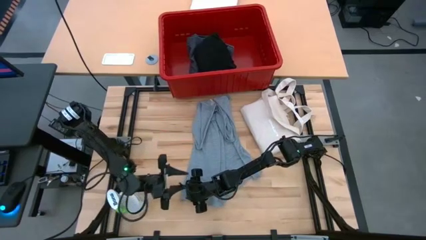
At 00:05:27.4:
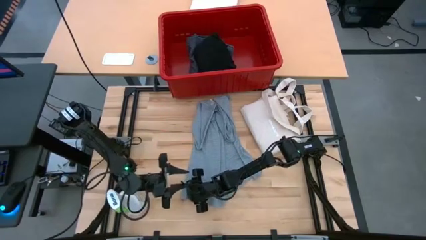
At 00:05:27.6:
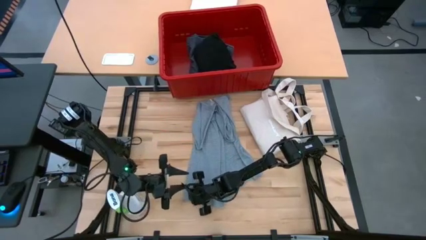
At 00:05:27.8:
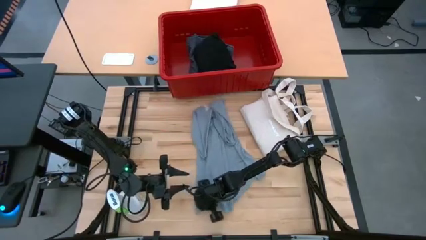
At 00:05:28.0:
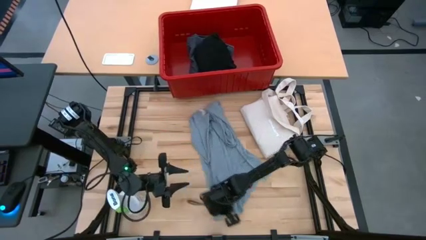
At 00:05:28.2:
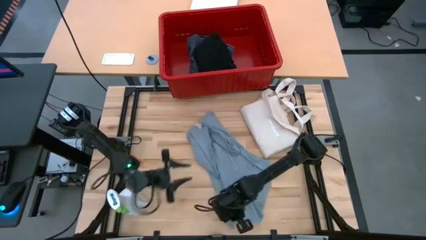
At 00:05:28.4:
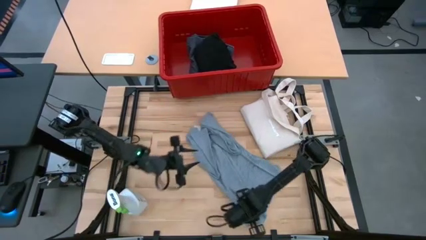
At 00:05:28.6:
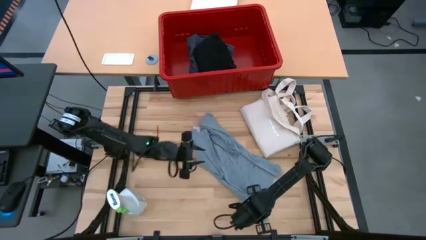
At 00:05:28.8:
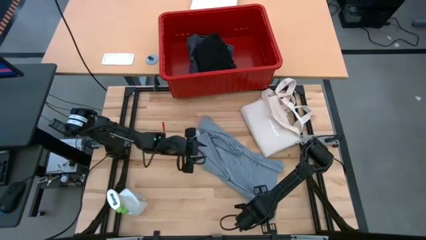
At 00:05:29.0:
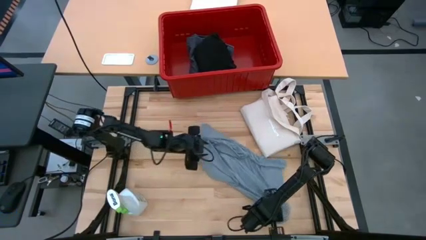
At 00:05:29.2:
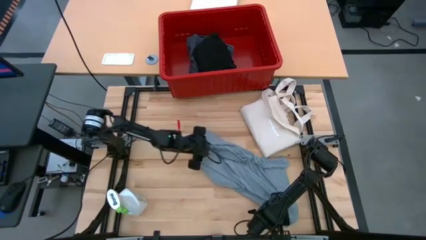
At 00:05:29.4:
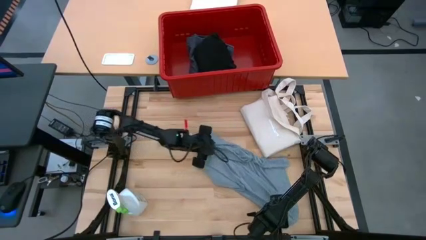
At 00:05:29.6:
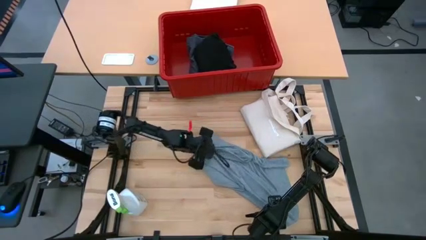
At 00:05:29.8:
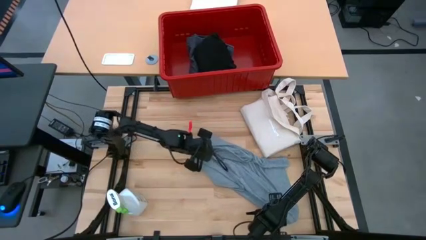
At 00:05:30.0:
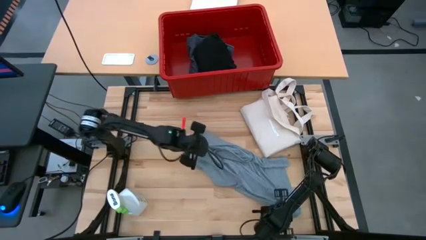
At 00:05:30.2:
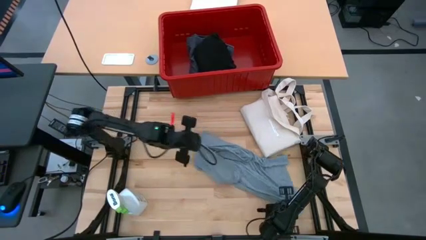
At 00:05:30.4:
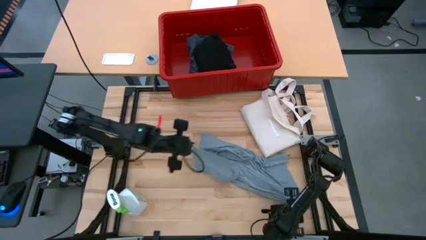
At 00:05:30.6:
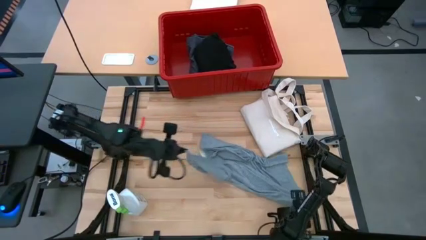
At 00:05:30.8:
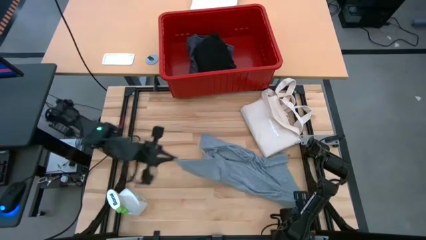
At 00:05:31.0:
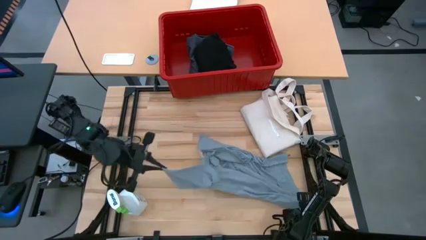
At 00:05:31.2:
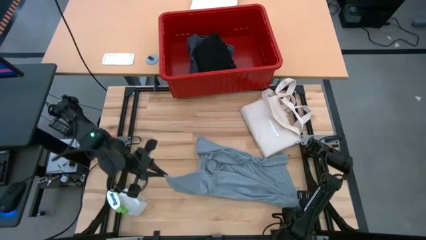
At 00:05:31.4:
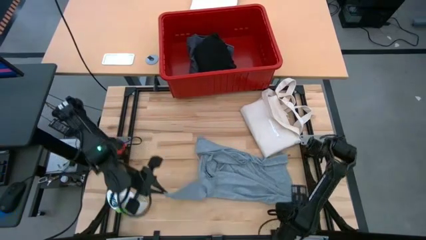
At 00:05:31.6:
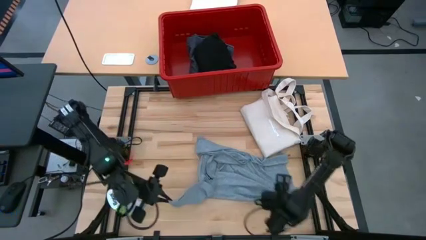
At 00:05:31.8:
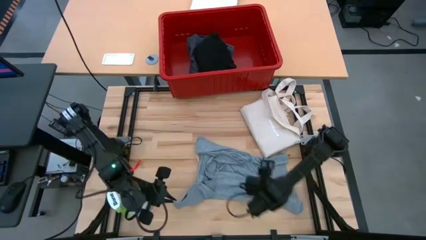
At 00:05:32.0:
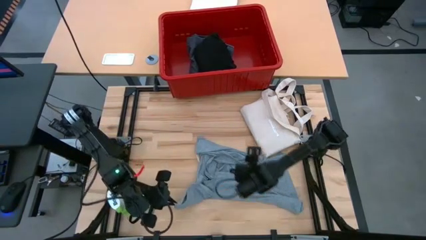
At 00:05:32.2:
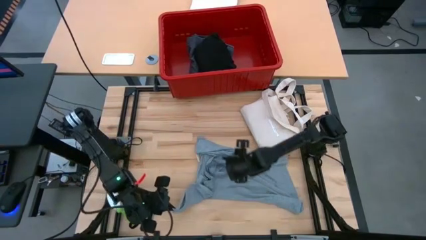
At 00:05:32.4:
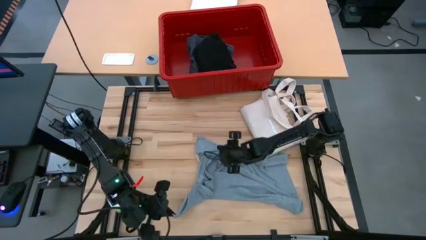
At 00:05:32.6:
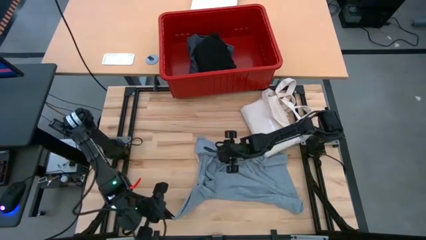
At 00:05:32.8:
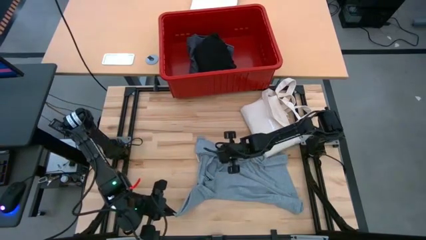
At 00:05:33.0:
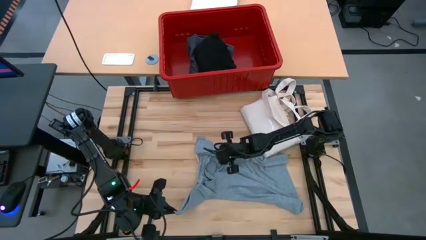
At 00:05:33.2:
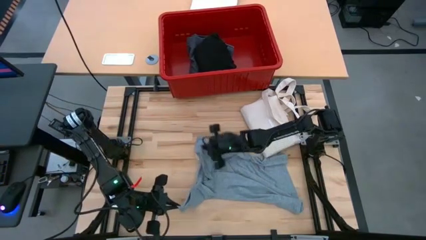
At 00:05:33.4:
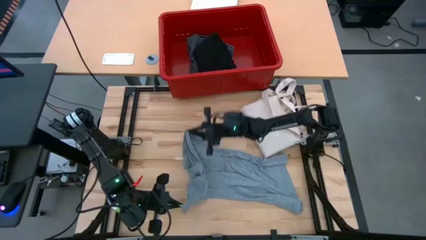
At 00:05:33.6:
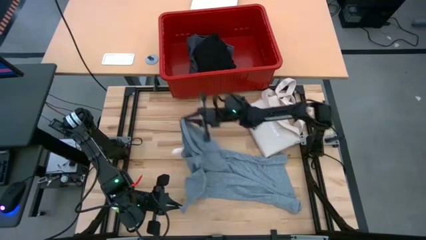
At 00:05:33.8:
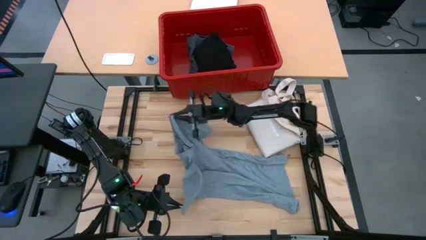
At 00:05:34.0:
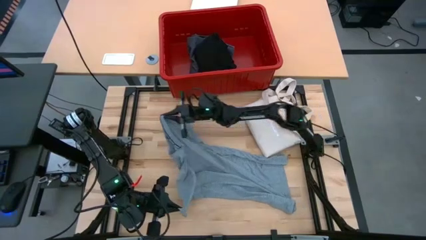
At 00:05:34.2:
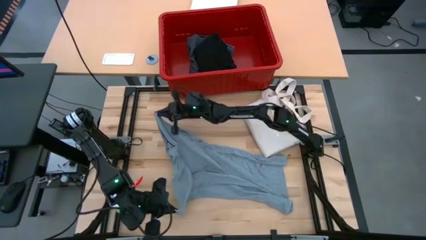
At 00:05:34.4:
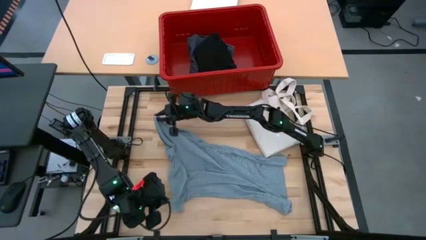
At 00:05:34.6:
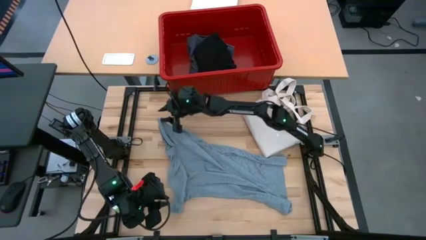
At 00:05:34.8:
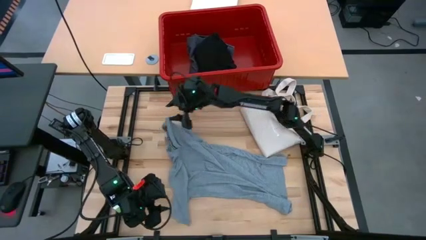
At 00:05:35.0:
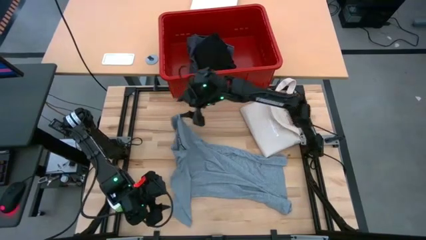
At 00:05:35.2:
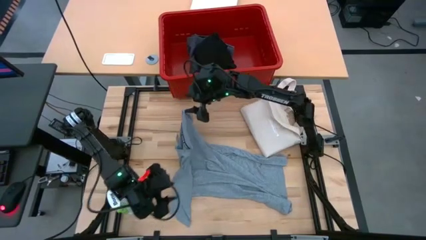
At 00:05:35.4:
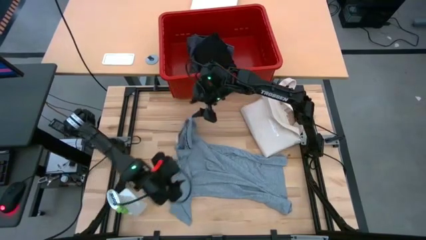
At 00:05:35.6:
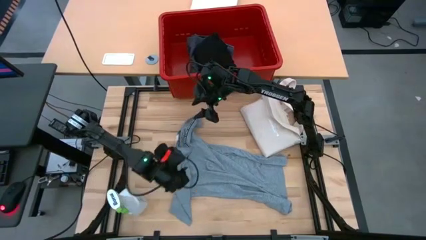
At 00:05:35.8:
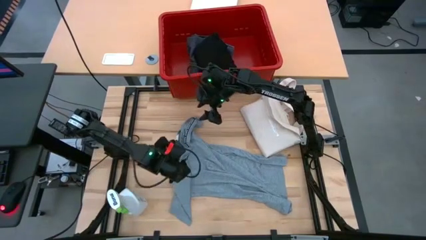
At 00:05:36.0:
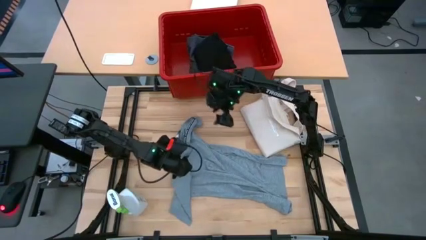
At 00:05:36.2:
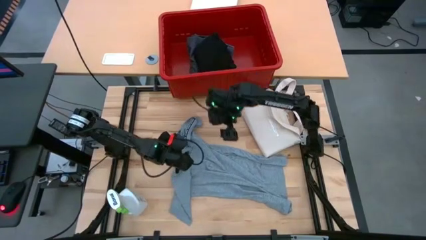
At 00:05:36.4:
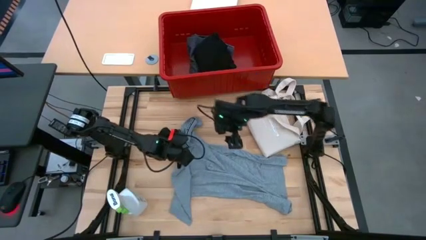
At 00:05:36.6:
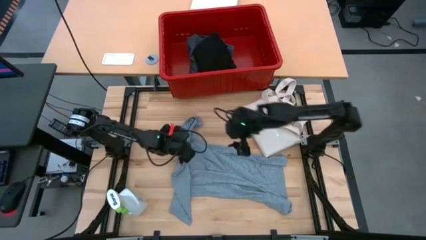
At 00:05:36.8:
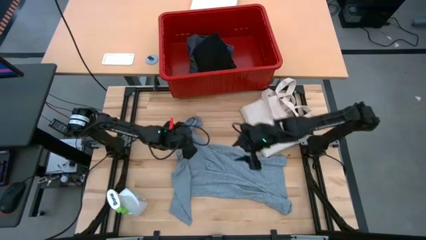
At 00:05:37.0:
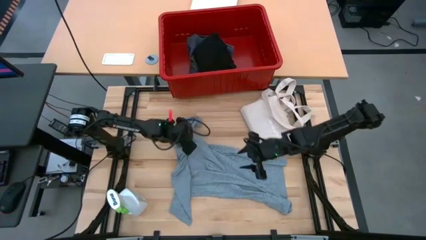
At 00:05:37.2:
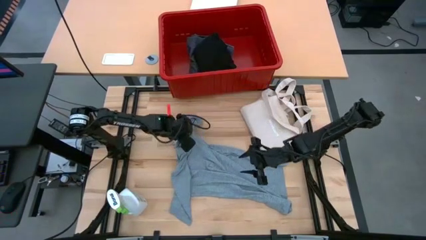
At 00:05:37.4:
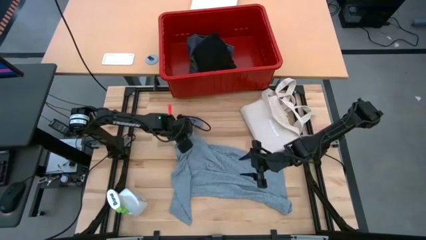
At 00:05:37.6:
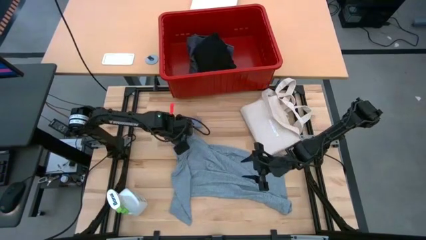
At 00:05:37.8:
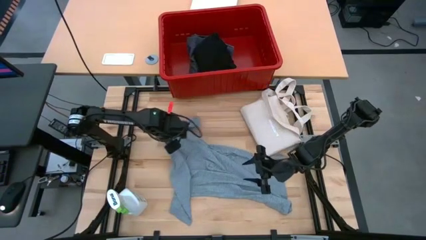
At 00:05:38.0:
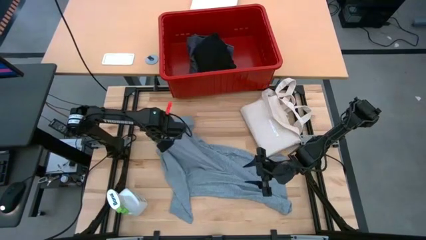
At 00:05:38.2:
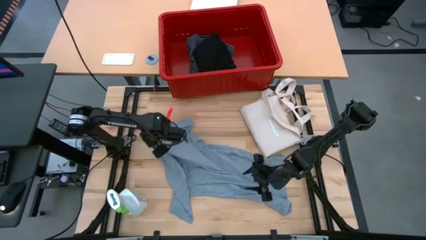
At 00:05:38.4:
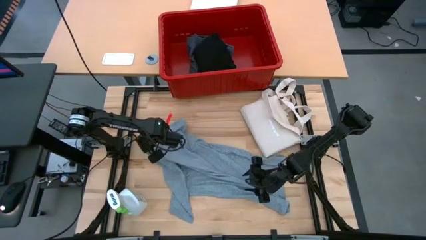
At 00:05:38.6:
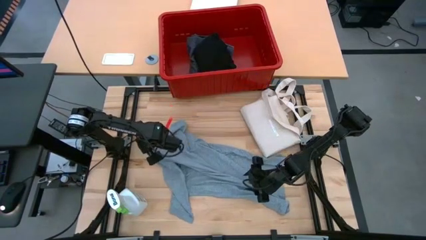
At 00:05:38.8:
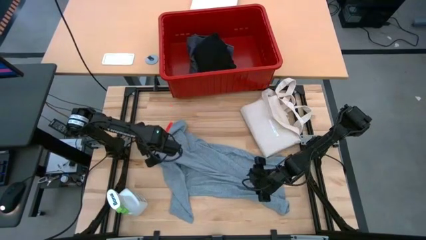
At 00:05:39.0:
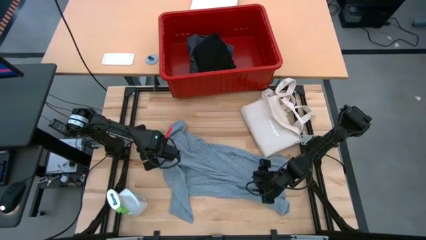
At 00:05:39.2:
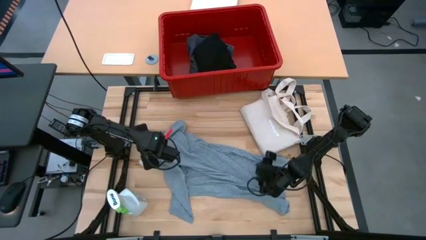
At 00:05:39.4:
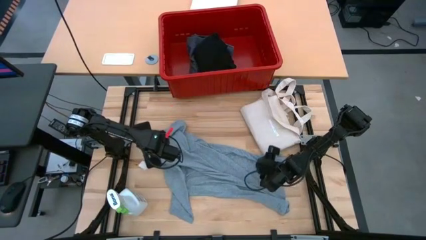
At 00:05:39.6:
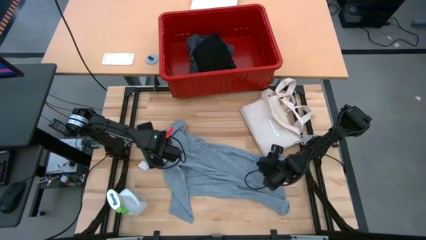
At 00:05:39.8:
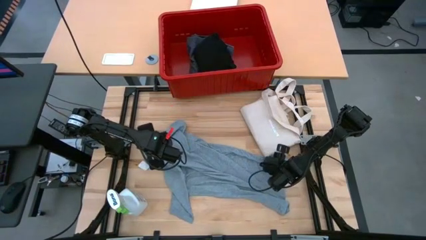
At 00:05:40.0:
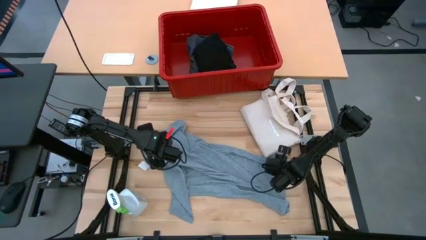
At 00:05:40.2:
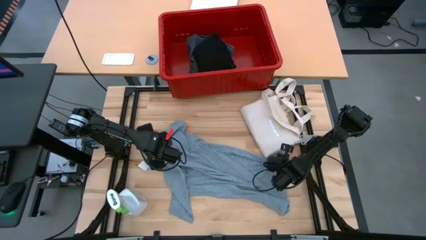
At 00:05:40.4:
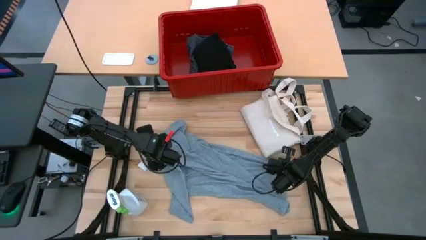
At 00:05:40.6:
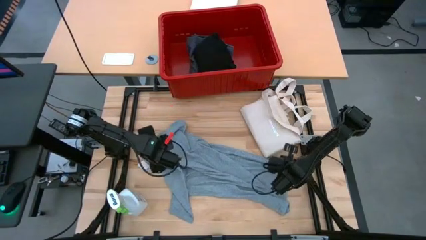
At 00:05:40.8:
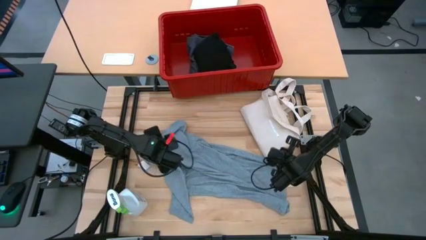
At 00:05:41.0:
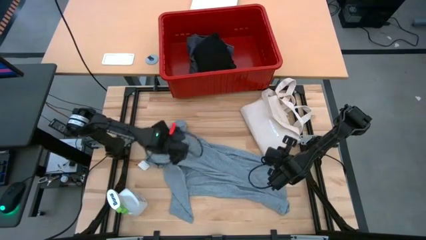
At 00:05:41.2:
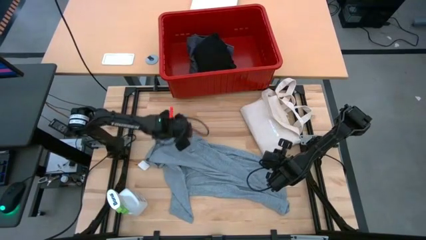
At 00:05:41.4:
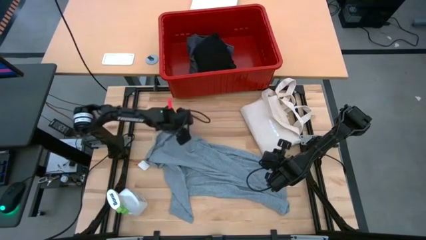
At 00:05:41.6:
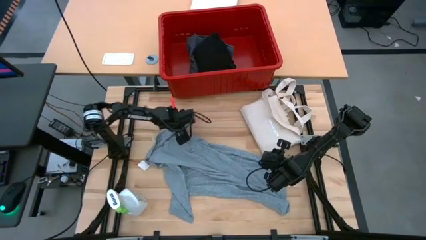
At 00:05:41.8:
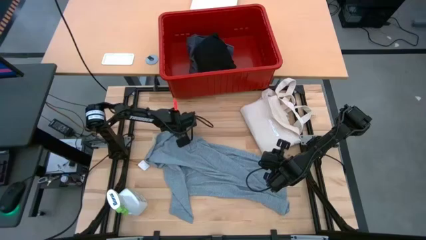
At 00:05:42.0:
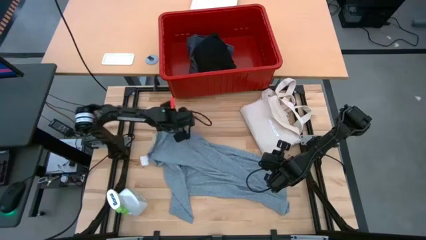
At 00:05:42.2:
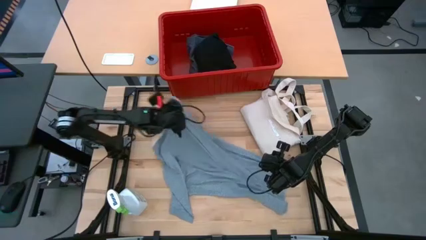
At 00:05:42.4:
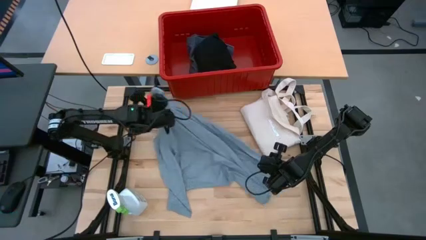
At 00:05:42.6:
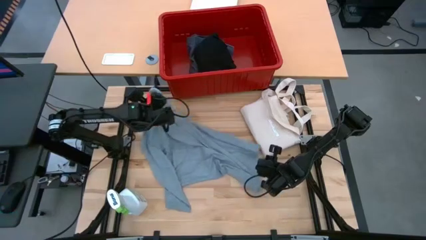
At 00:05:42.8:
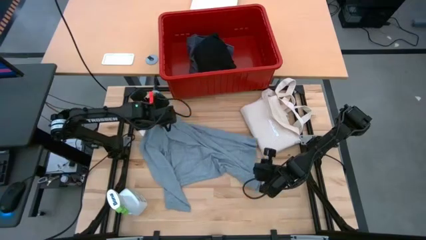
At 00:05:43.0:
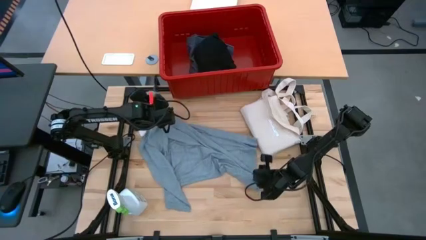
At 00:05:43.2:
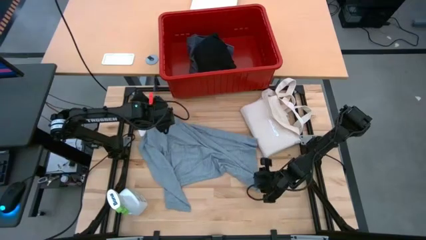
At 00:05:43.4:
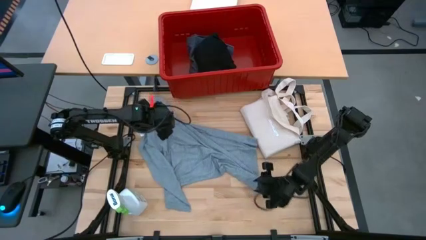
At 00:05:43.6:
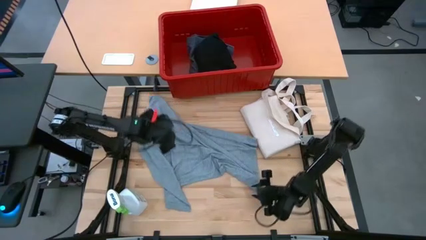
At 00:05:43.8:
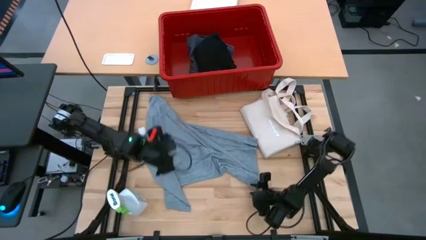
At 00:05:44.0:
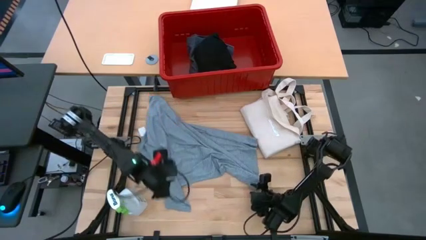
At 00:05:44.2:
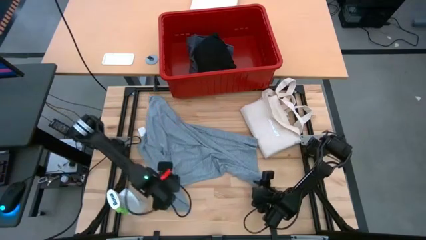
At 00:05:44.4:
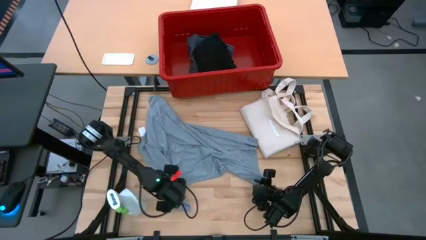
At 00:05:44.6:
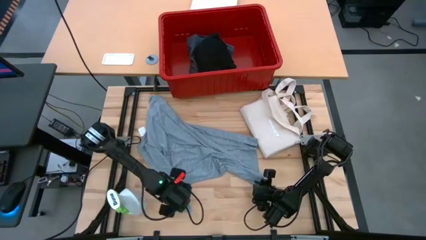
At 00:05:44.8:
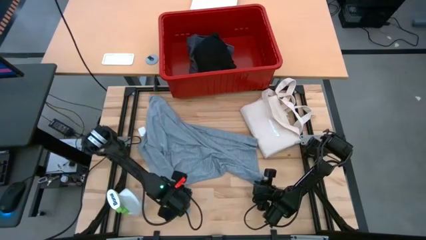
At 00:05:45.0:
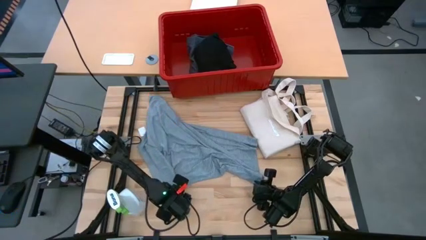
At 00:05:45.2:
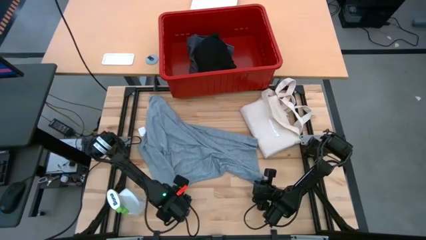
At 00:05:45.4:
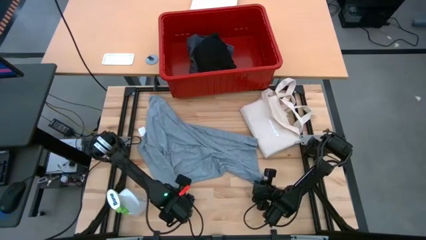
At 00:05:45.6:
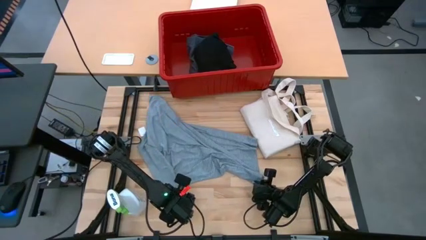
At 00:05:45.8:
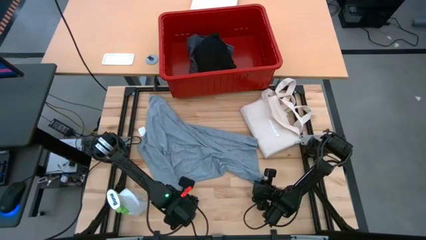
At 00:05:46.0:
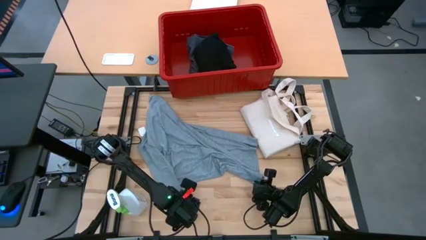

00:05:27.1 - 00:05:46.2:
Task: Fold Laundry from Bin
Fold the gray shirt
